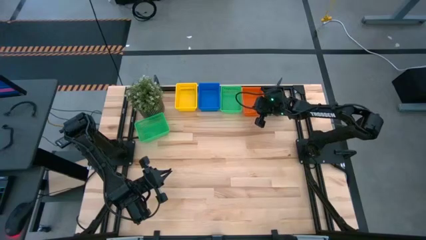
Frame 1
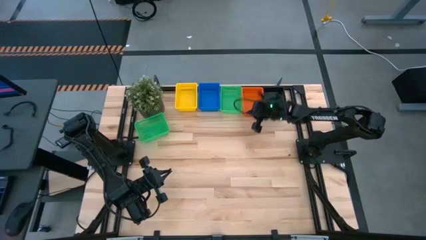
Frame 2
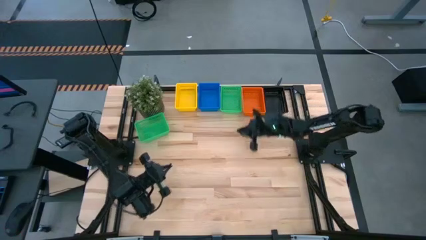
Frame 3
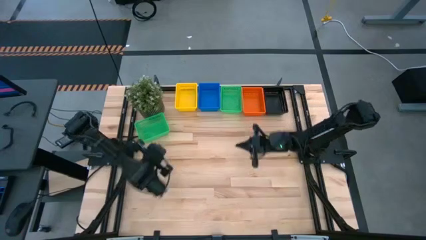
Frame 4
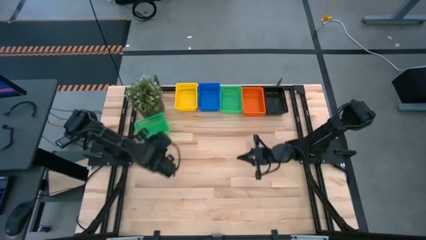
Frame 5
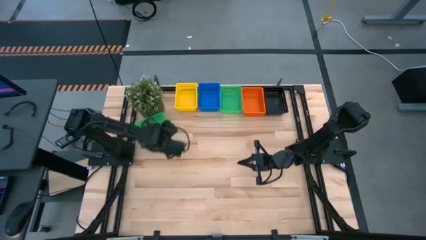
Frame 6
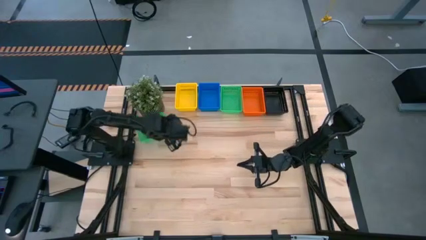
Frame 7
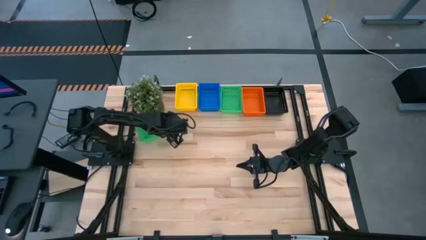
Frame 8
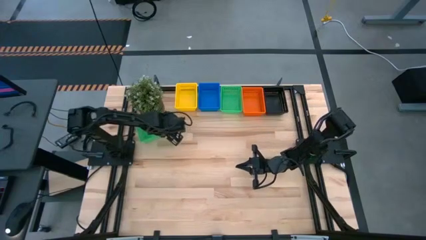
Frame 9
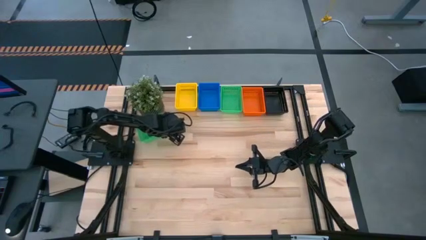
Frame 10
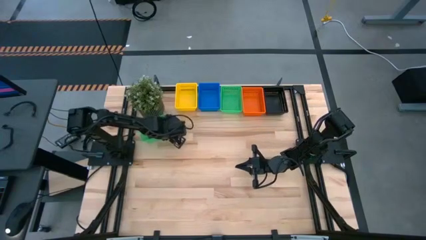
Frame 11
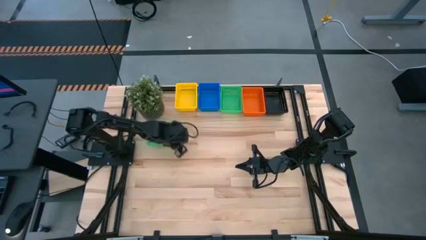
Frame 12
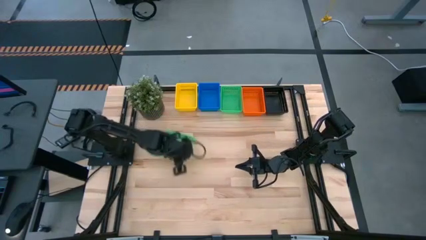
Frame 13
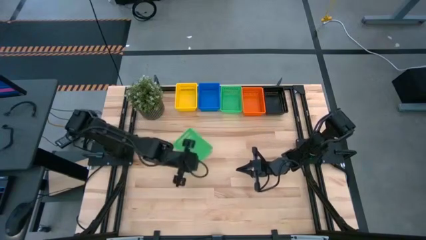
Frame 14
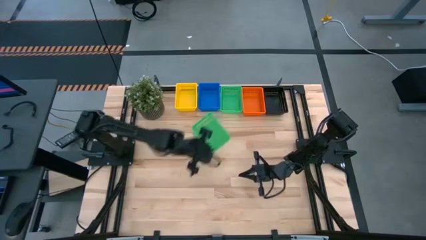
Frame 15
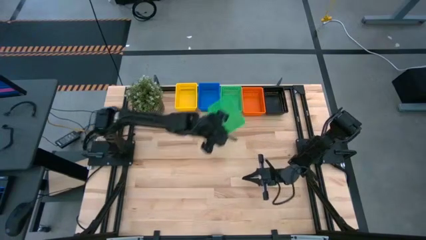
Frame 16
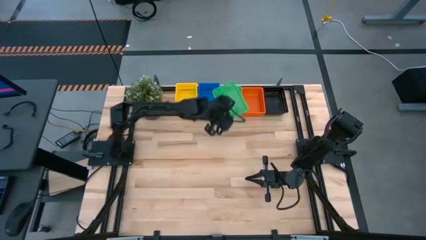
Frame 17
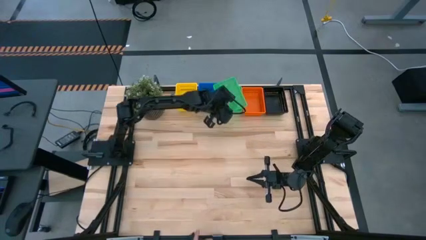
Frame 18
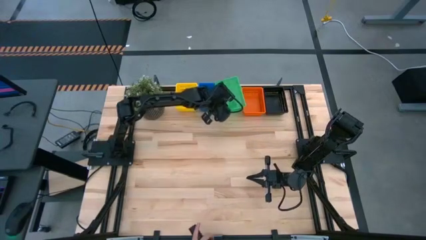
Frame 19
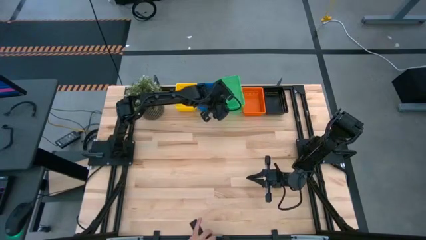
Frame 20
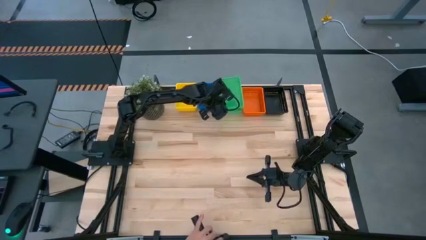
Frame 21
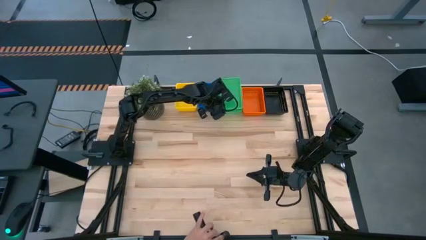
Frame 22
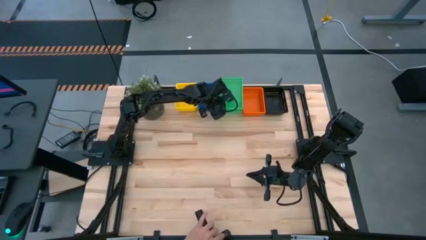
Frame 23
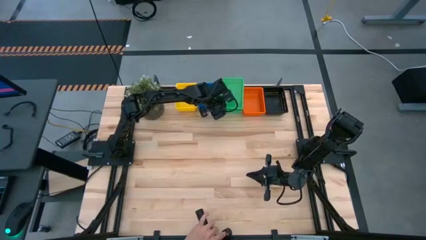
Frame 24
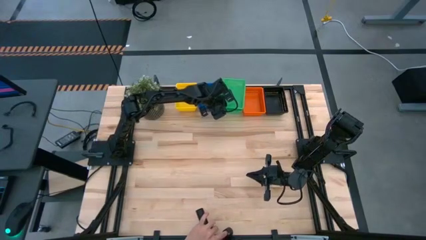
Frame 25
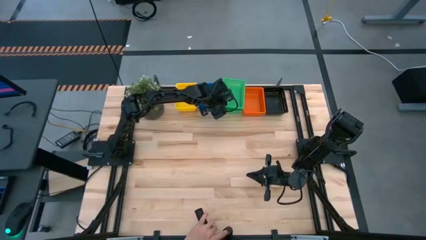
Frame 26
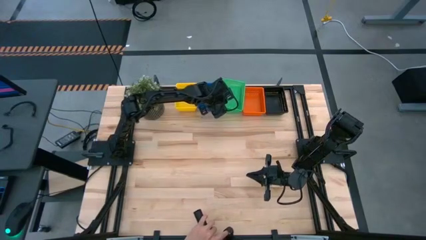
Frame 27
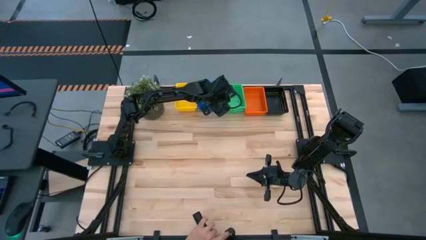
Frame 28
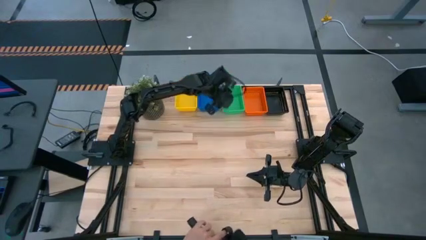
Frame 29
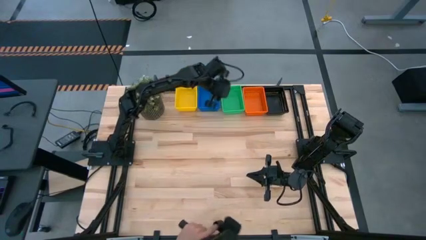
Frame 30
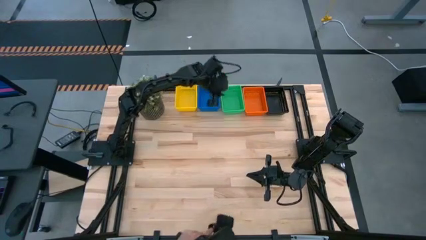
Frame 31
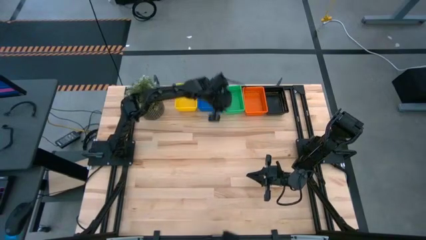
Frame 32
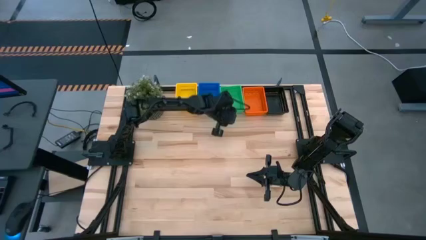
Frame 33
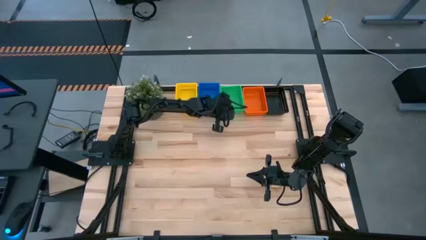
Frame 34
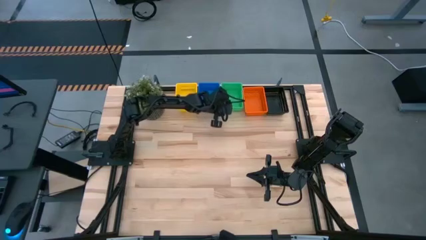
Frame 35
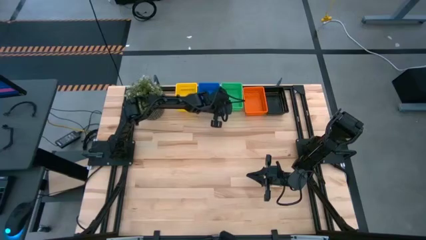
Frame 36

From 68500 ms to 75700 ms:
Stack the bottom green bin on top of the green bin

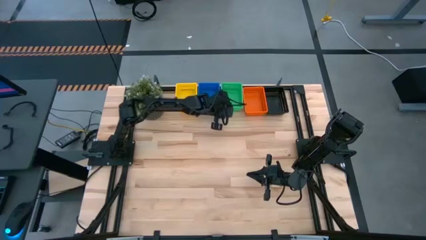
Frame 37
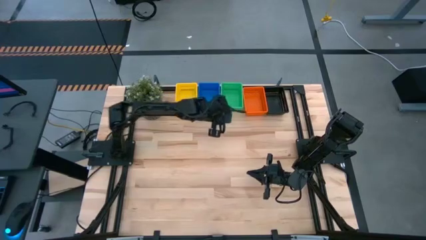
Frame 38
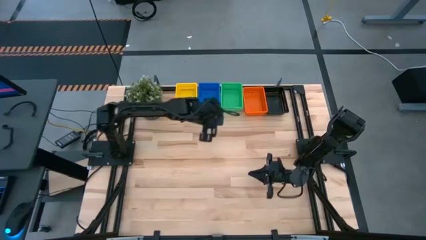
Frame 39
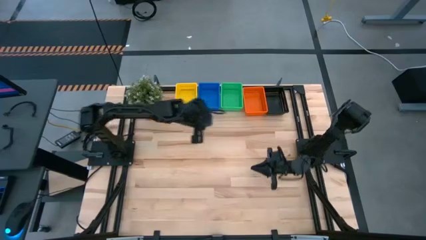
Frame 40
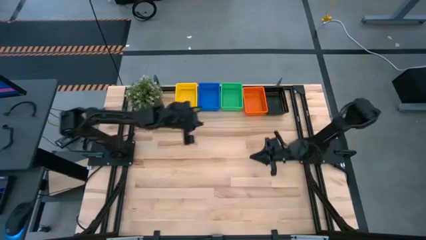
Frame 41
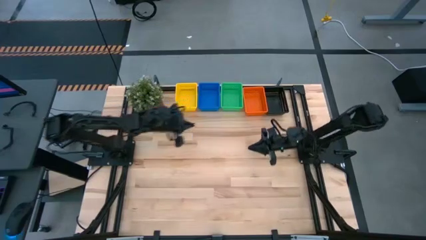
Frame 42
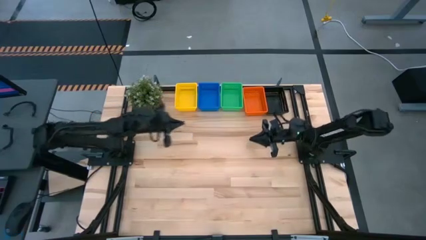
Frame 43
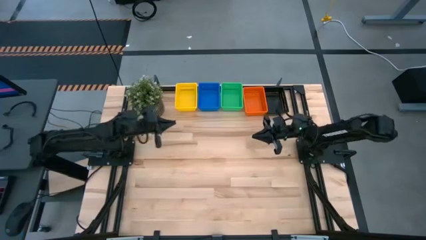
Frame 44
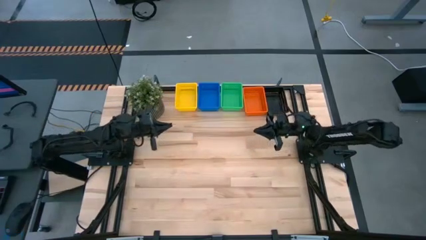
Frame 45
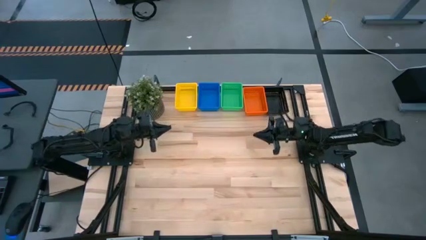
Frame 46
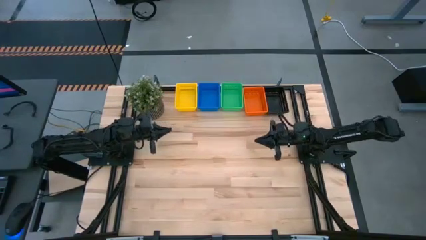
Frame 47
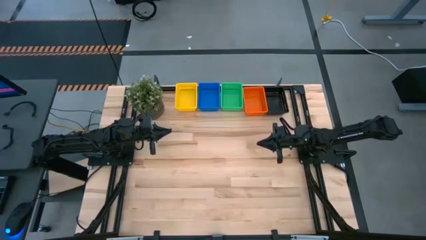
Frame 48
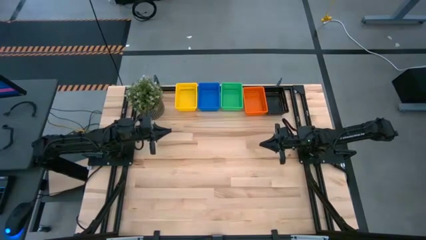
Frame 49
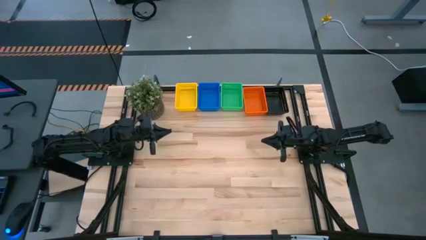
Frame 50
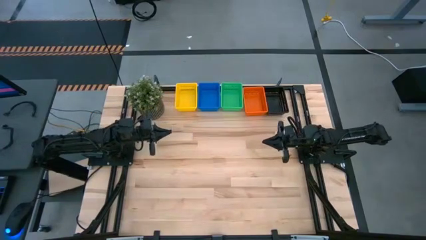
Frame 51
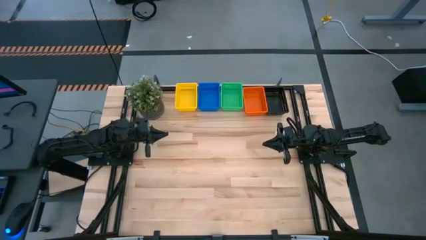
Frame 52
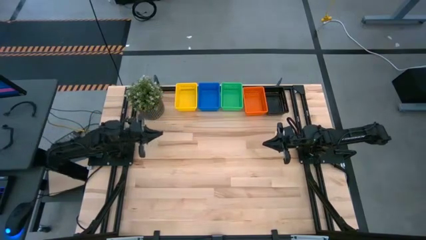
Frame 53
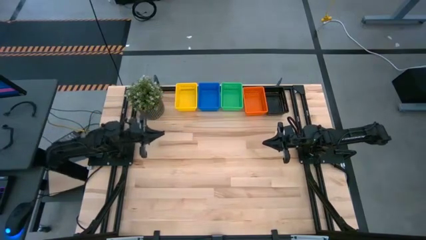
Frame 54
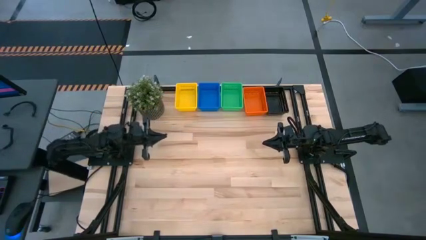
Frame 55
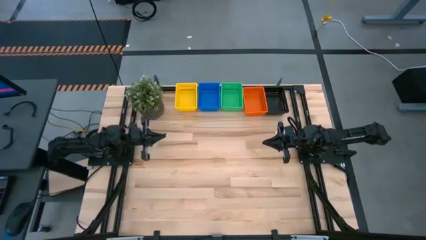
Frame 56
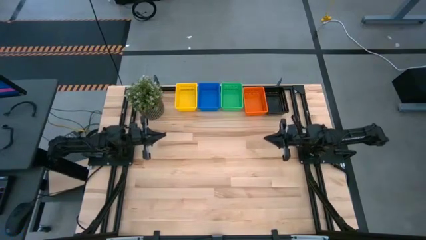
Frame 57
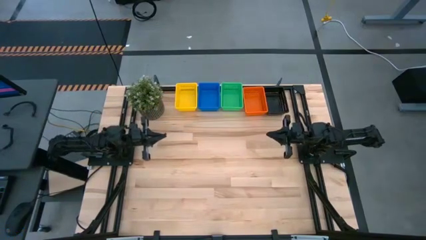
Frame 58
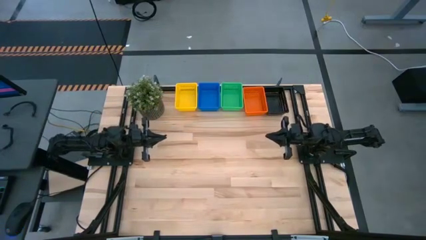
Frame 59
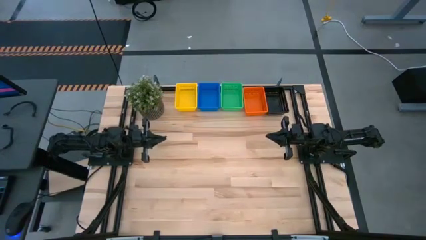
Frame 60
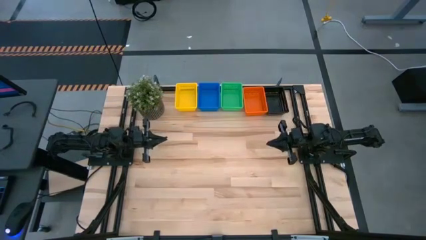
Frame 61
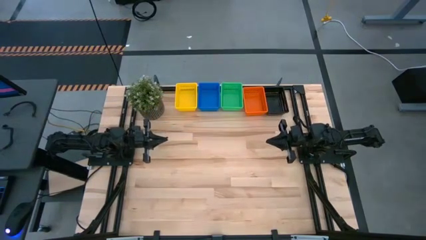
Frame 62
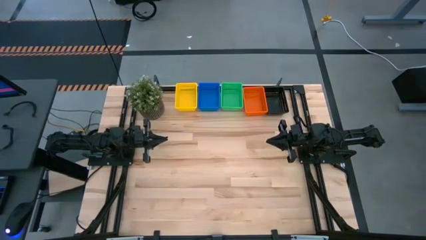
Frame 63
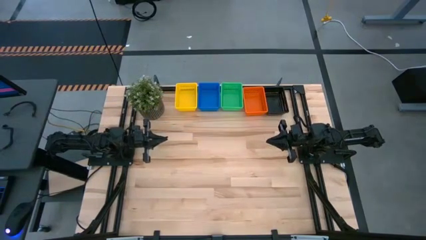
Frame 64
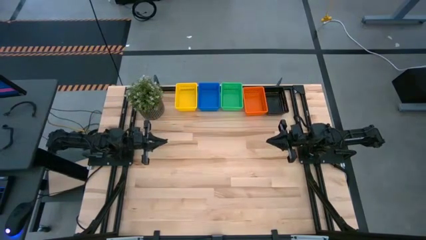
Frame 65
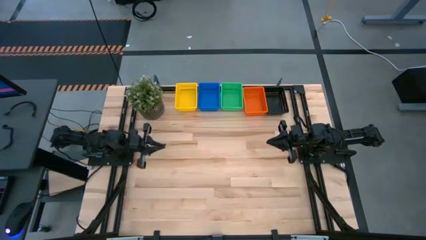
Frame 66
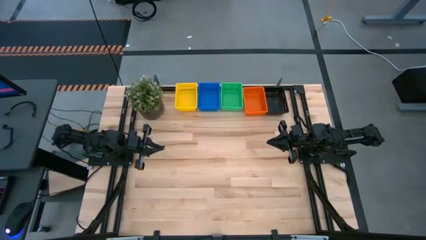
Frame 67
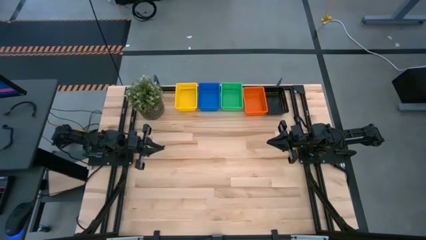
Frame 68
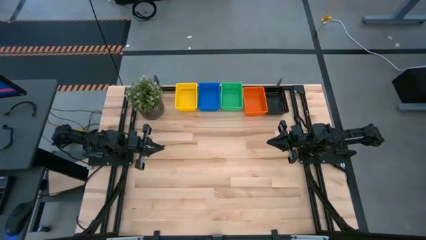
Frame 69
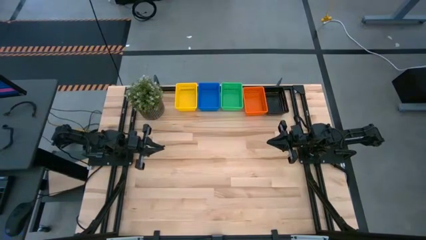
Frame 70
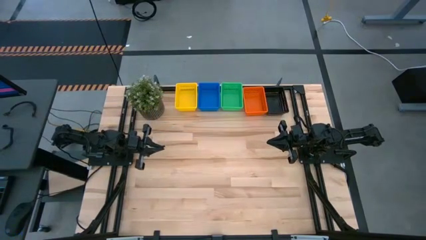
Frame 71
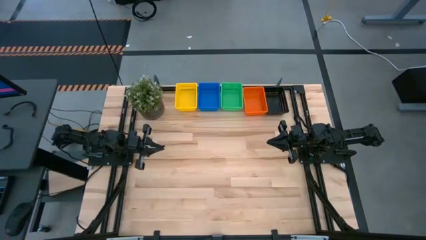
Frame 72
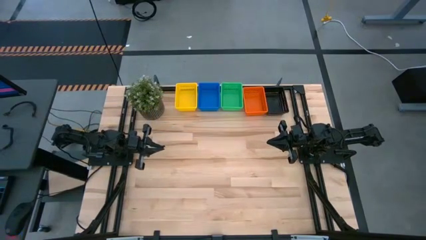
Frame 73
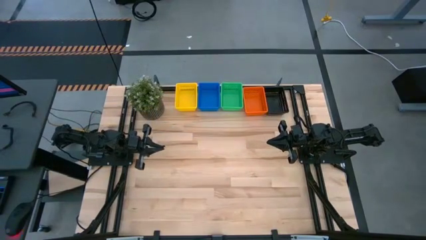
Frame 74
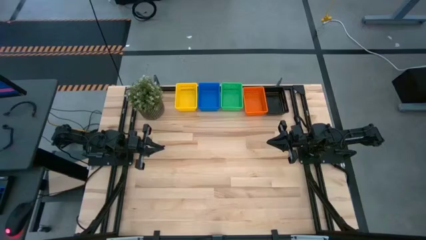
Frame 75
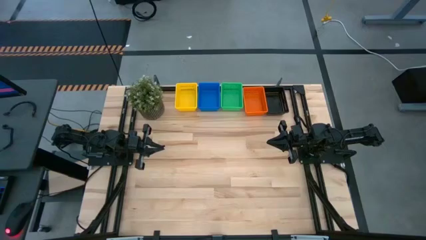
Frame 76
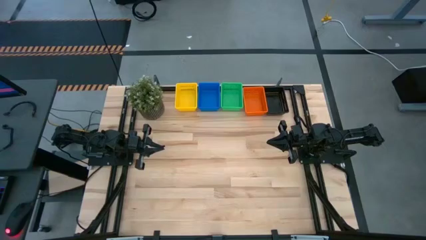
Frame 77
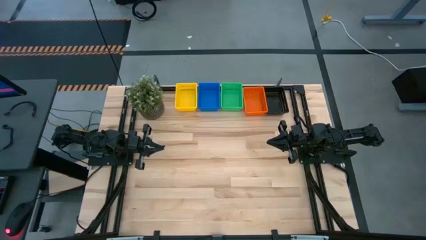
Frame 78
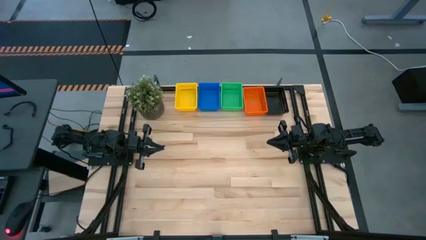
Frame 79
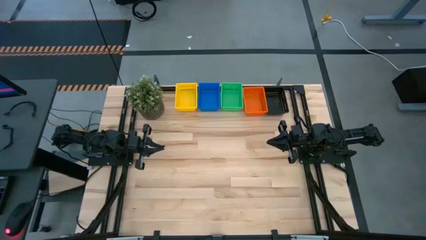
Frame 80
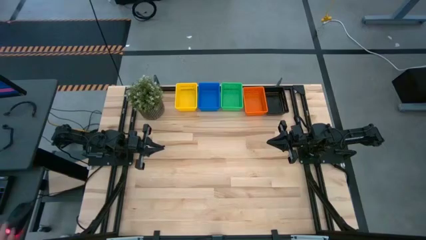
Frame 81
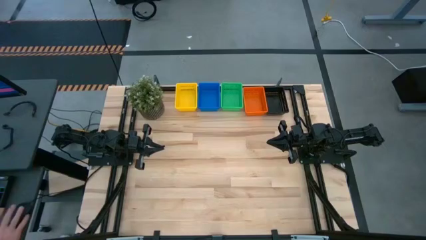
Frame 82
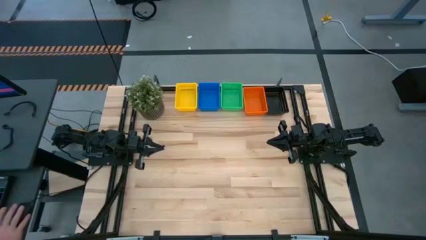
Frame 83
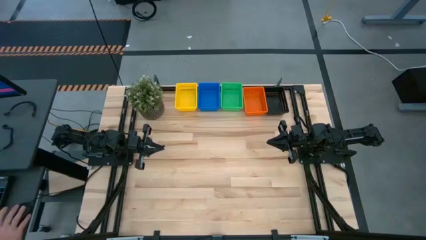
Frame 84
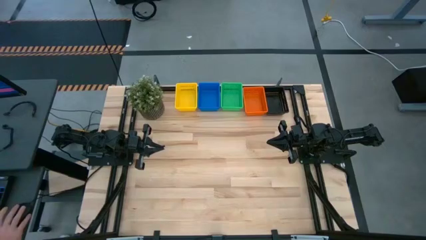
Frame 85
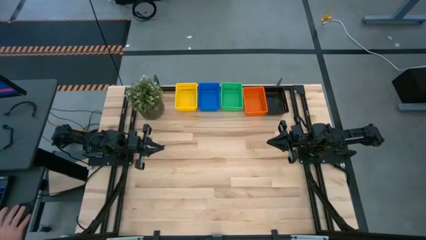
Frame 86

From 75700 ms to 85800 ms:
Return to Home Position
